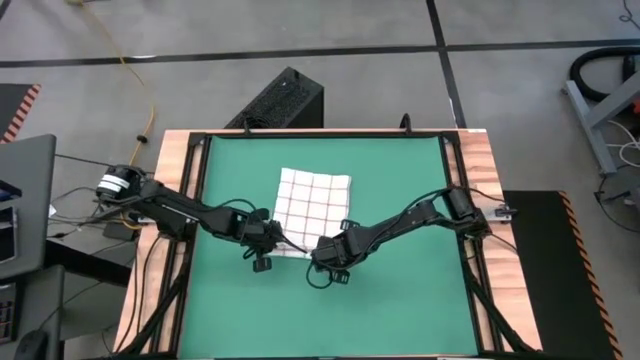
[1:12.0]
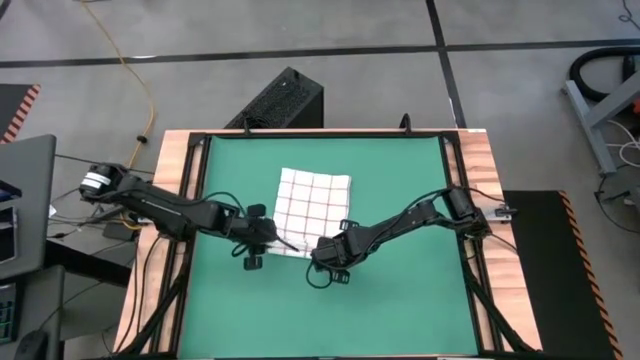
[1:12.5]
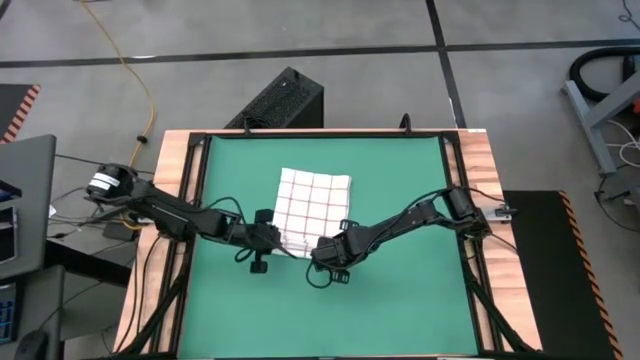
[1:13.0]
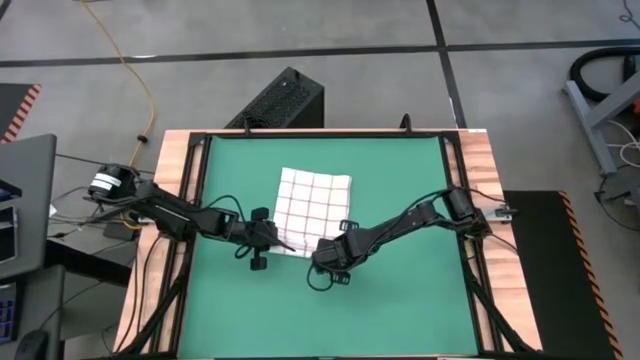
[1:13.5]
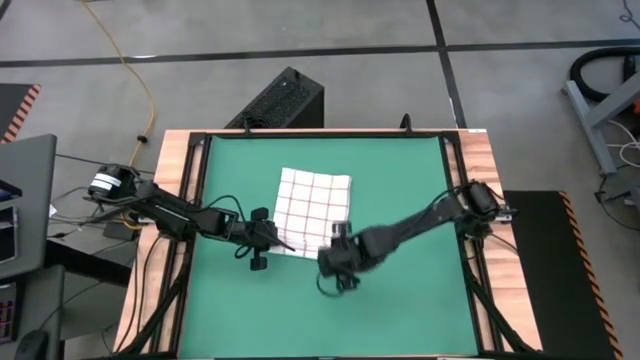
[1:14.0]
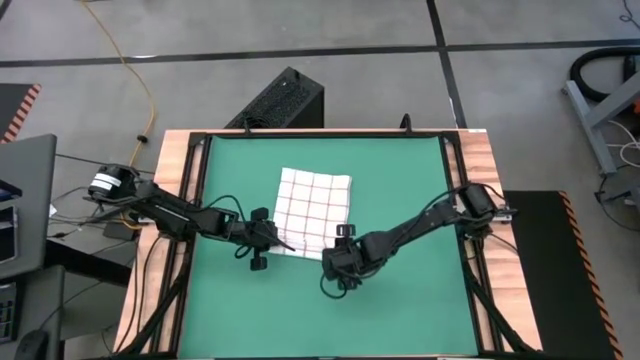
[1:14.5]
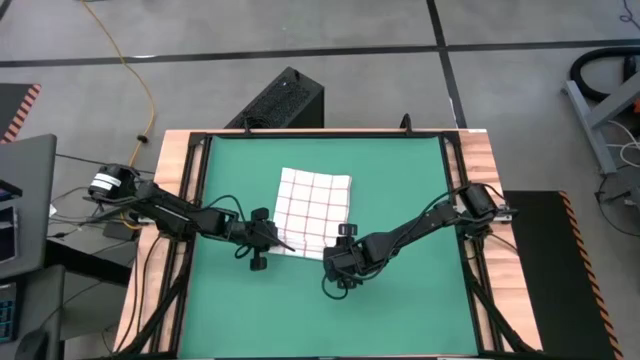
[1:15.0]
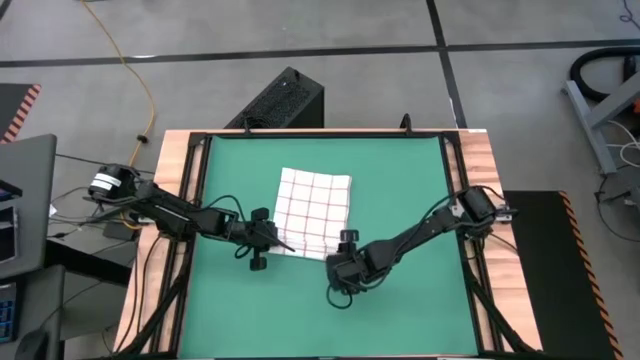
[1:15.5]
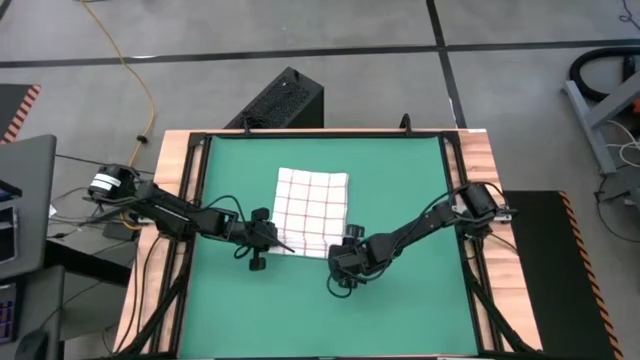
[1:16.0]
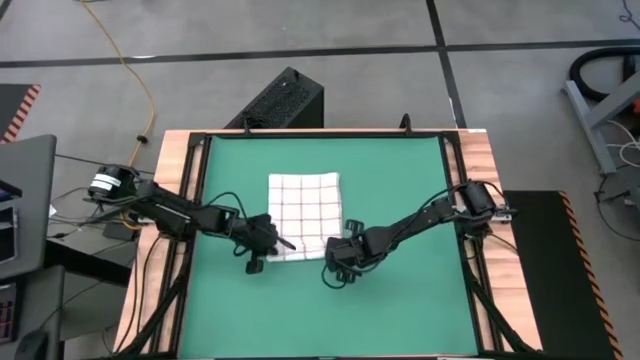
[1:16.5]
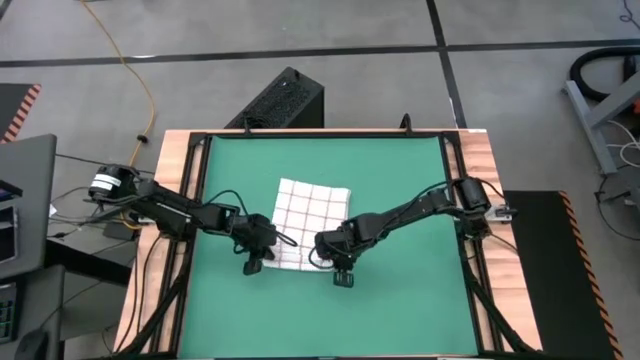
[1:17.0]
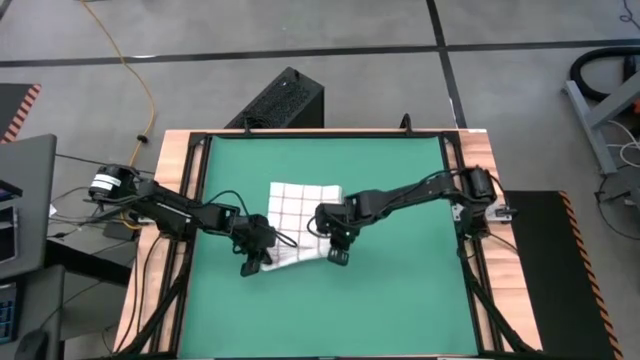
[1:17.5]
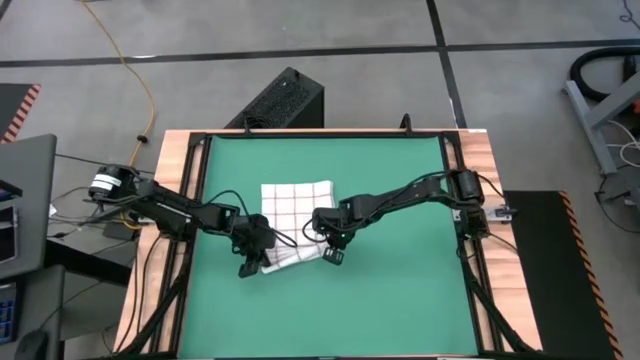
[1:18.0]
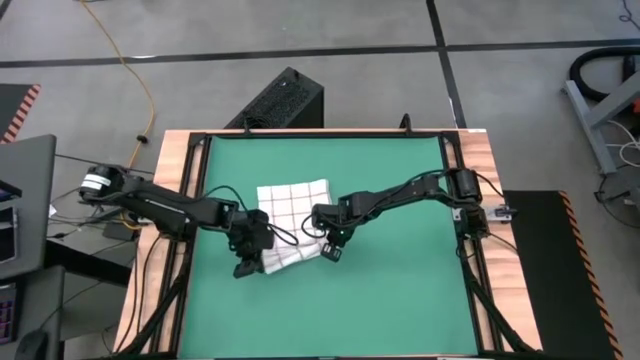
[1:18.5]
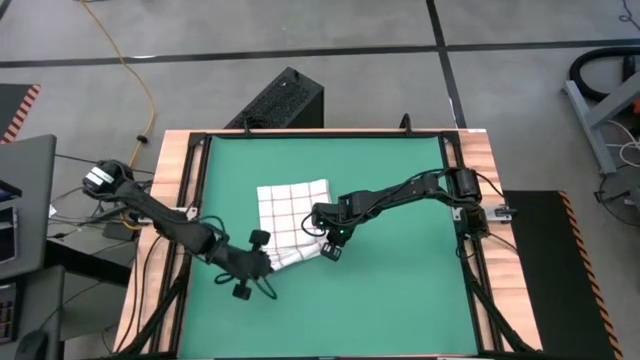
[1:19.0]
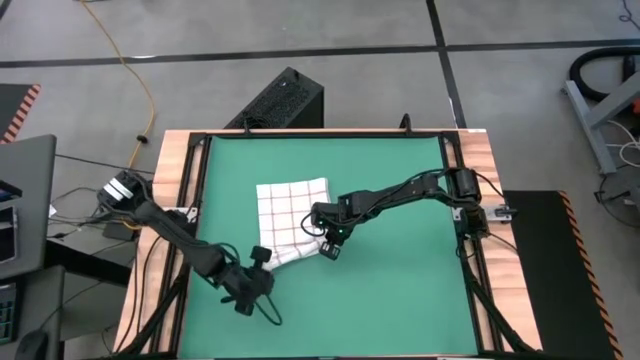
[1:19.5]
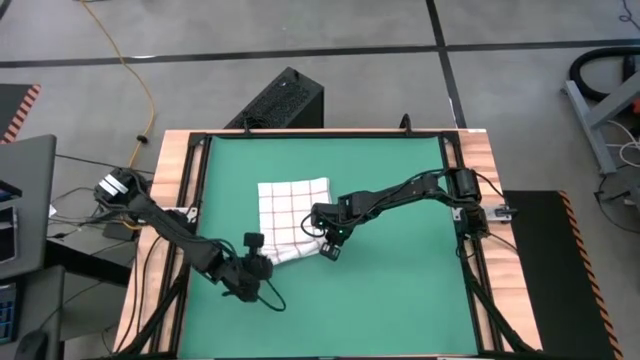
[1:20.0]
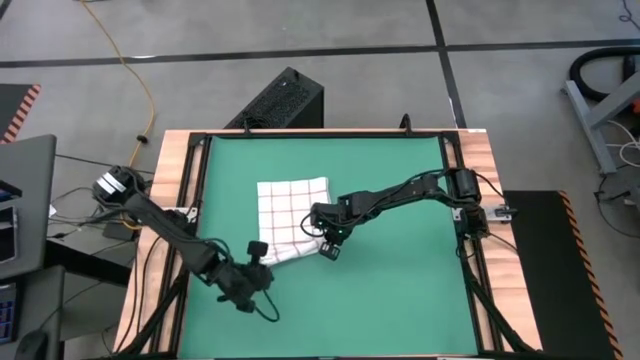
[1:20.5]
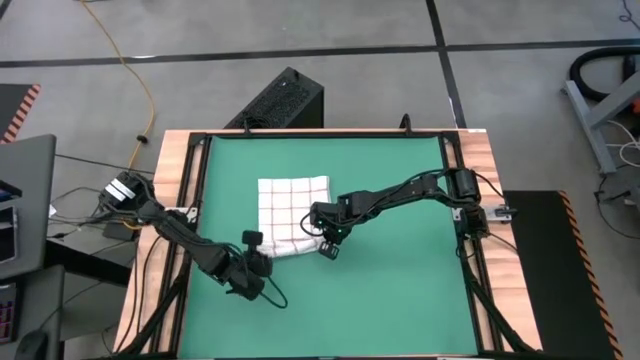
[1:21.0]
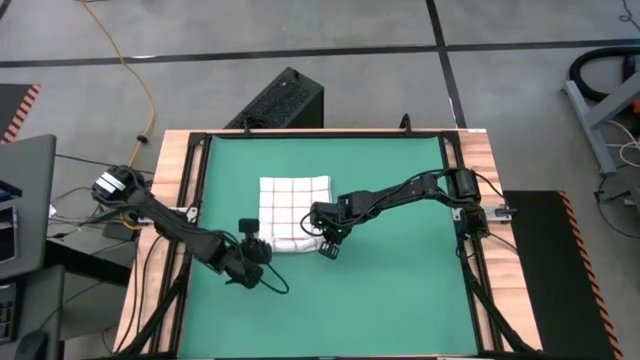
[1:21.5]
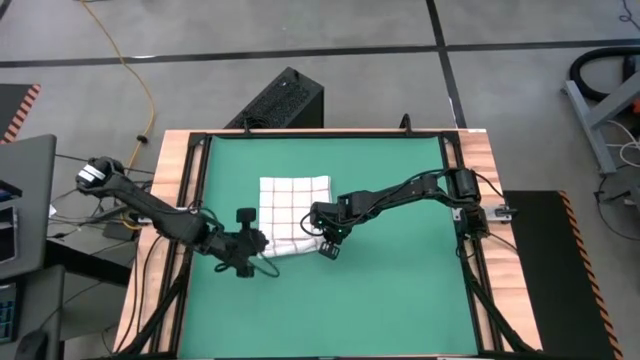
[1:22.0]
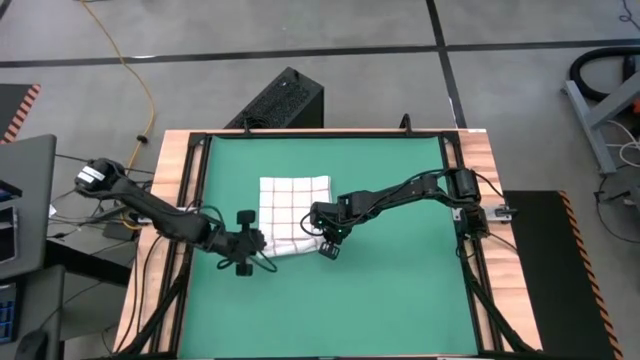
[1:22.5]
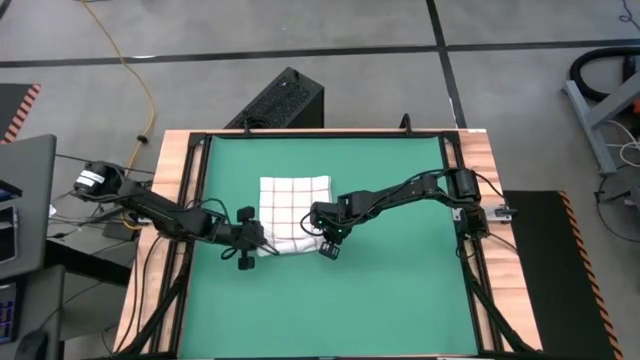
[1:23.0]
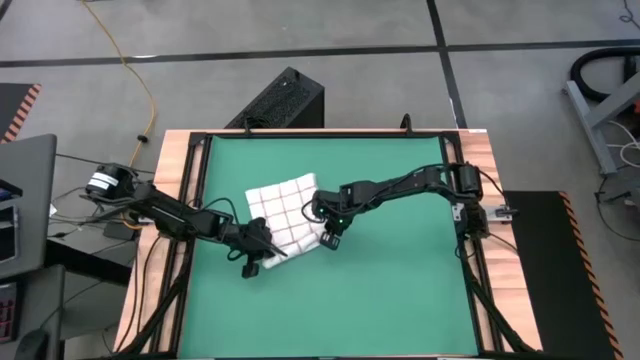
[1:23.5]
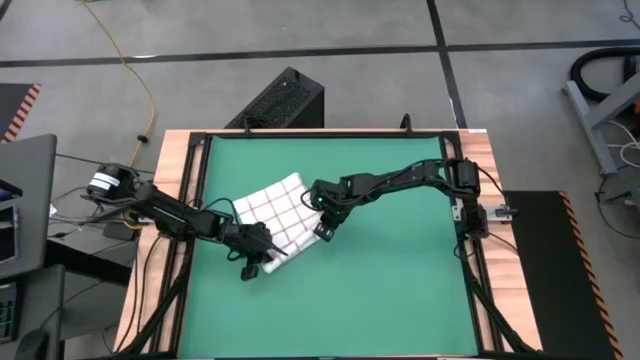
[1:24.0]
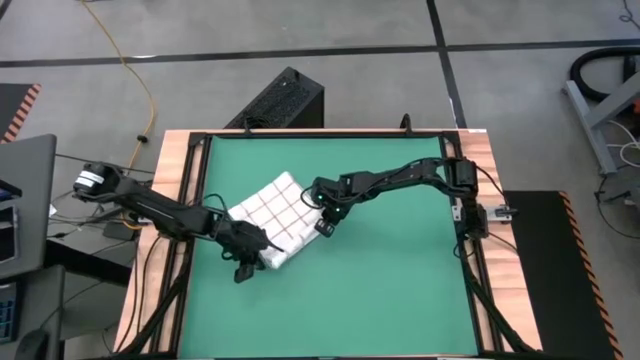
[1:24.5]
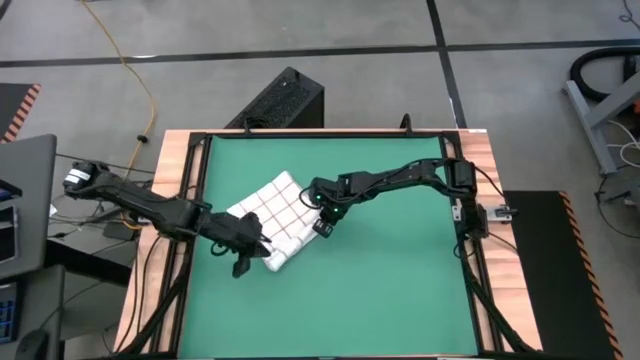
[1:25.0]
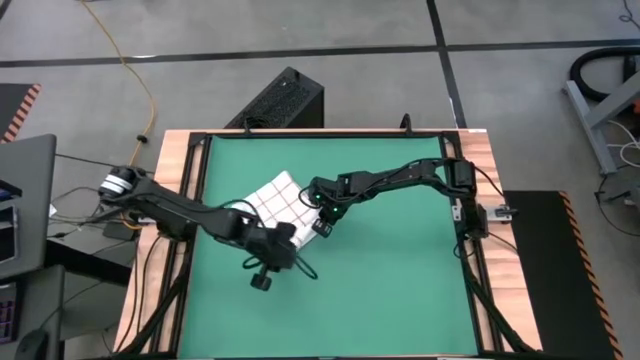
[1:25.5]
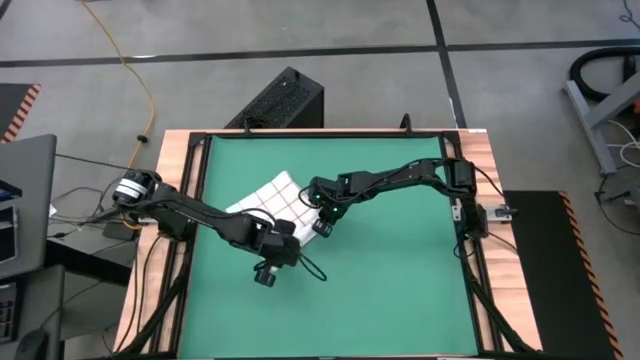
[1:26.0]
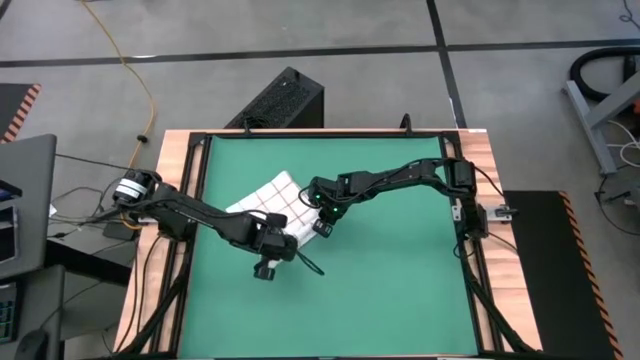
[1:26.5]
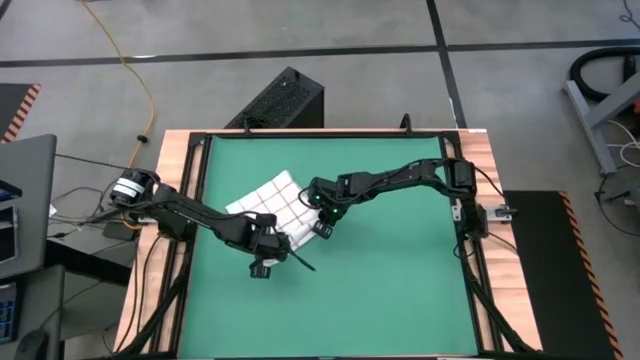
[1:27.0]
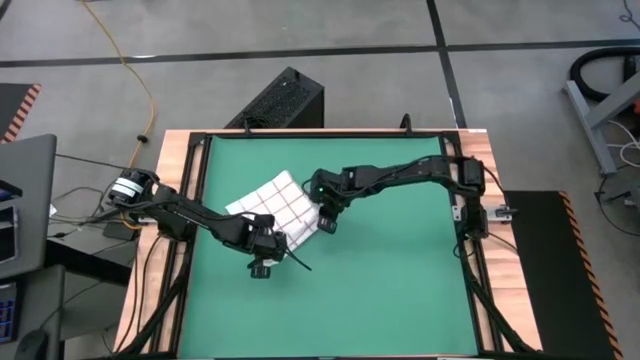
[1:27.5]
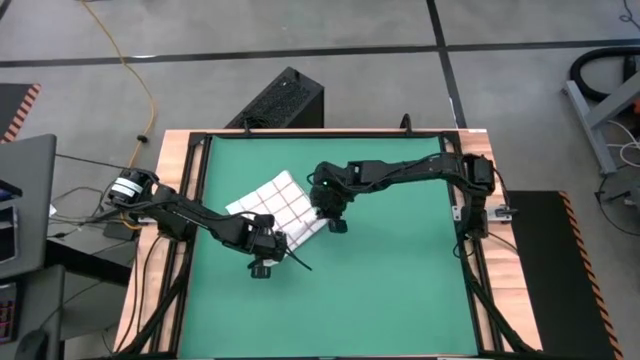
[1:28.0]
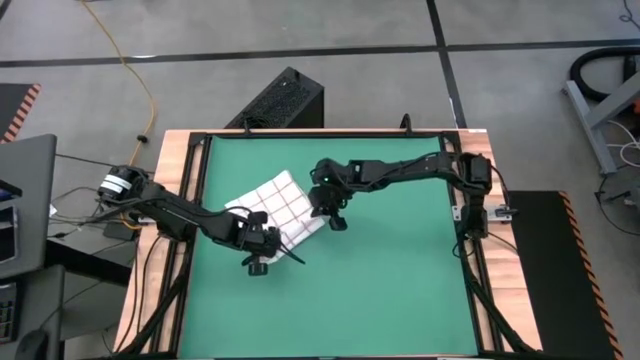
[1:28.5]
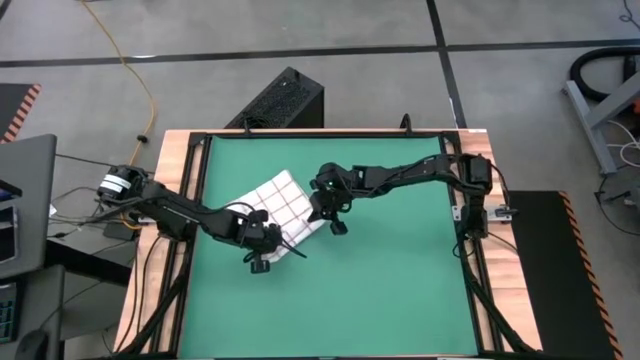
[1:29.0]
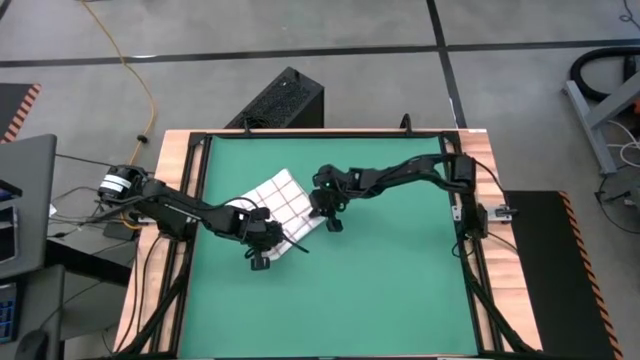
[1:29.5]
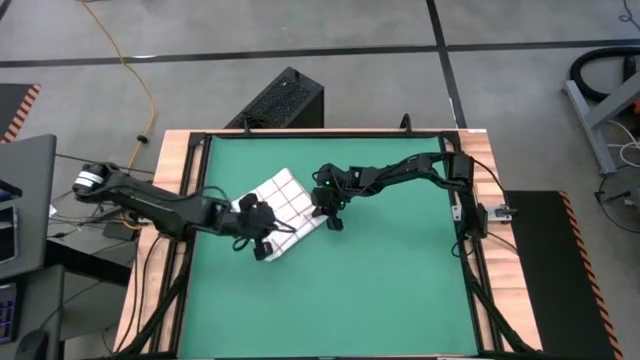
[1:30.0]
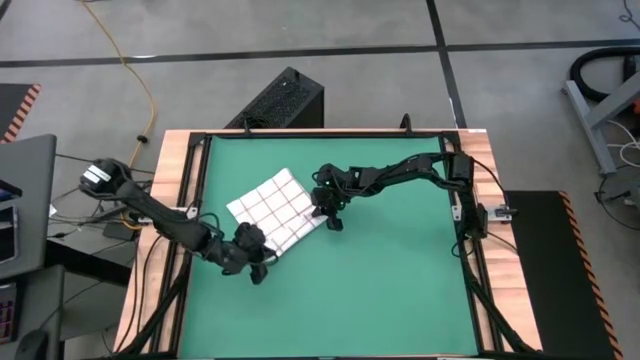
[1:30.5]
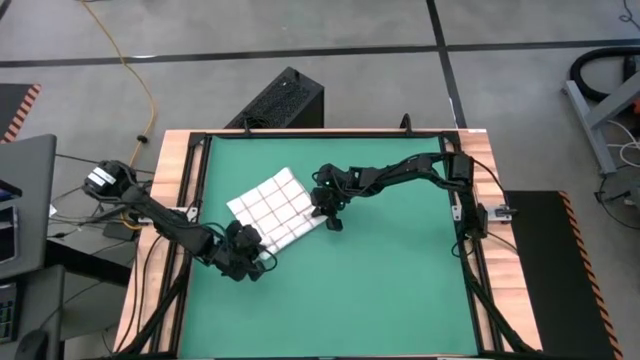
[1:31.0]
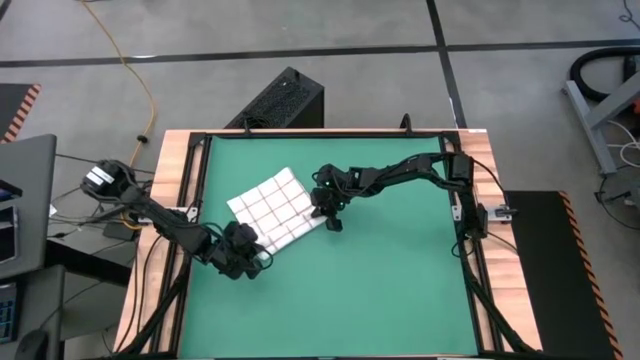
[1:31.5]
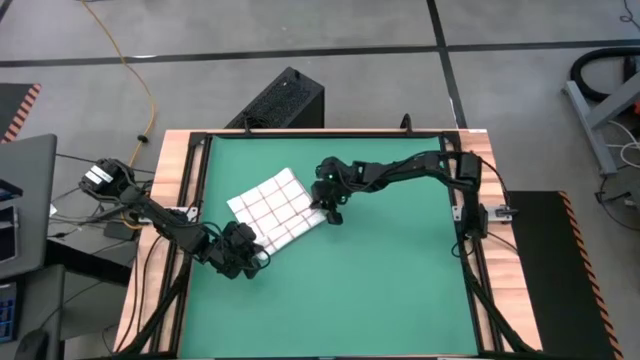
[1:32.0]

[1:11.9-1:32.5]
Task: Roll towel
Roll the white towel
